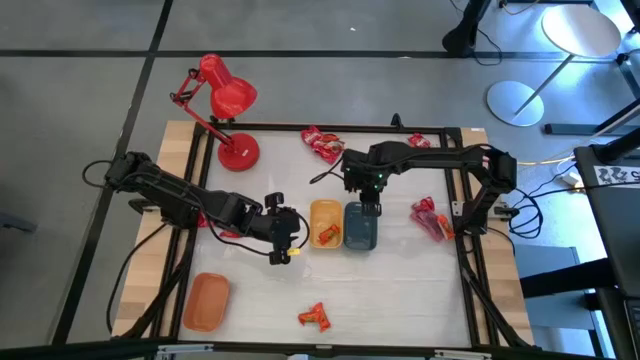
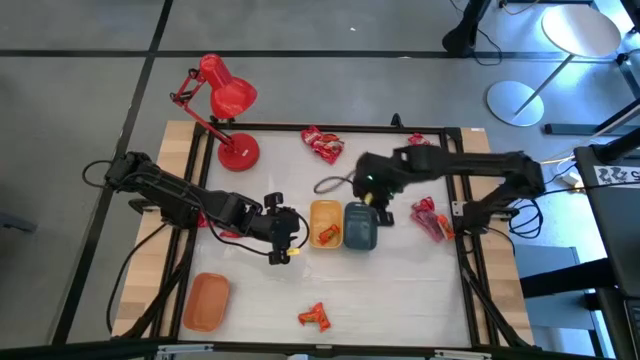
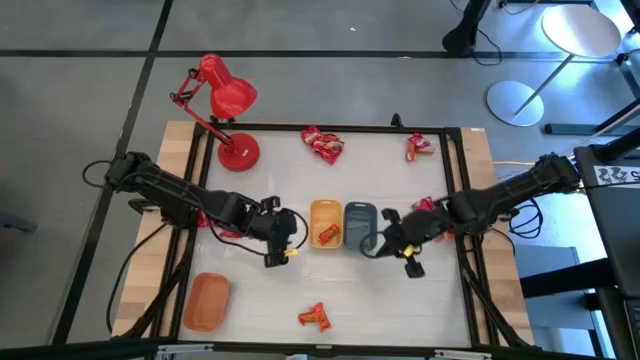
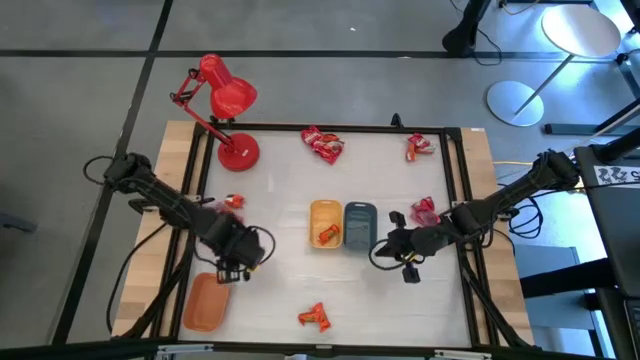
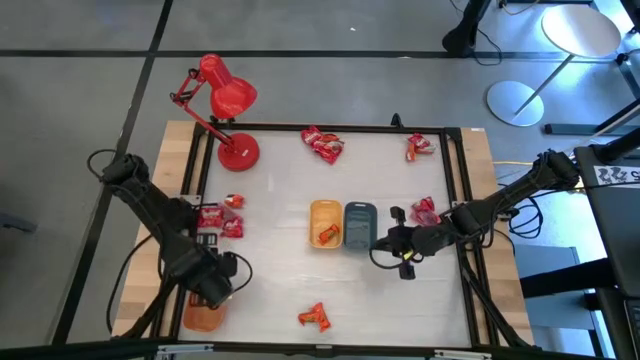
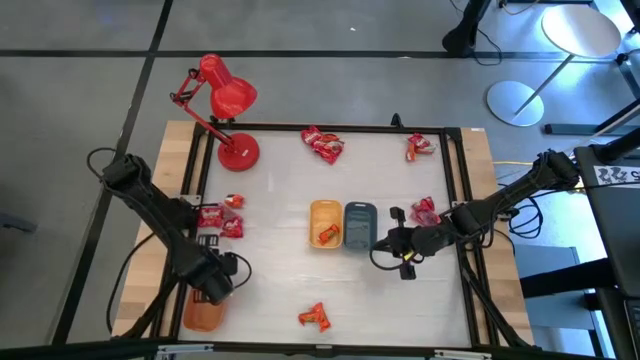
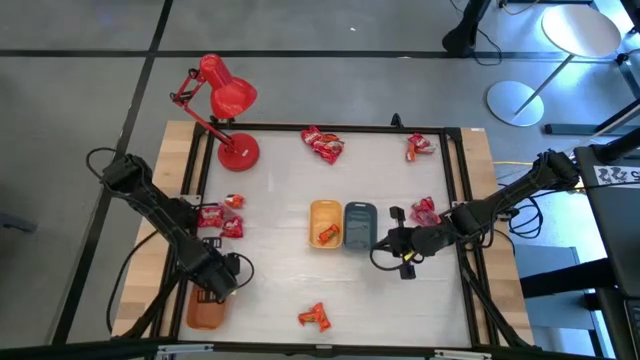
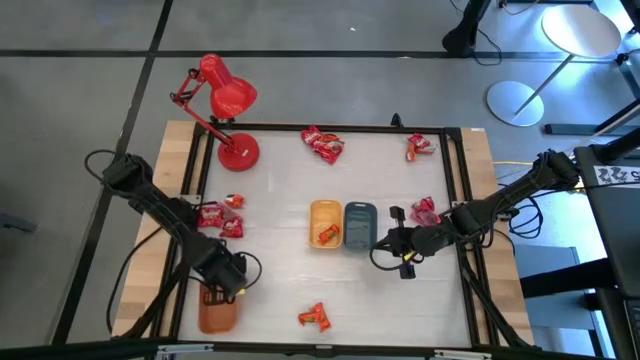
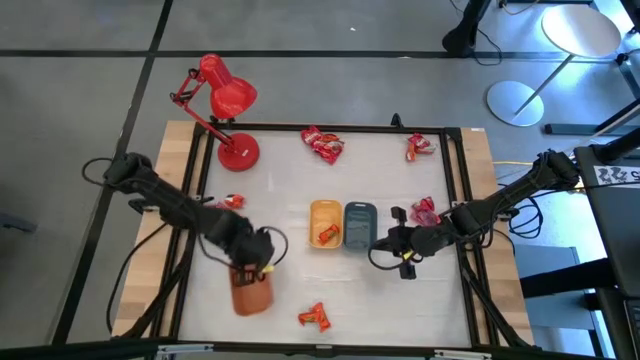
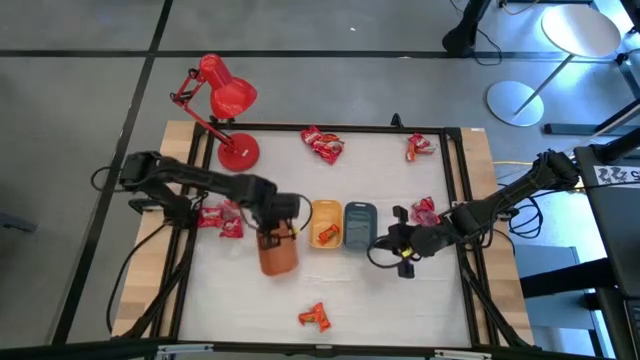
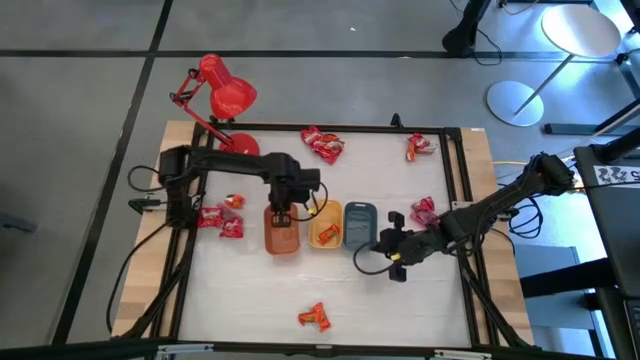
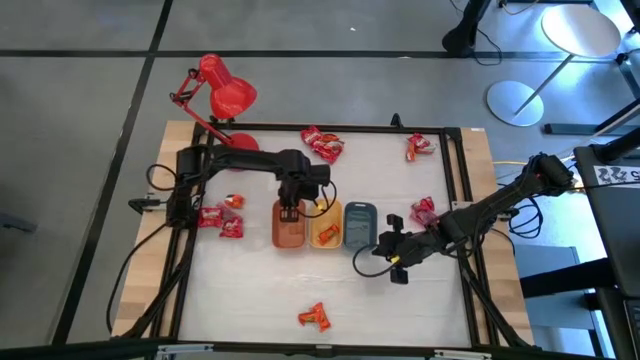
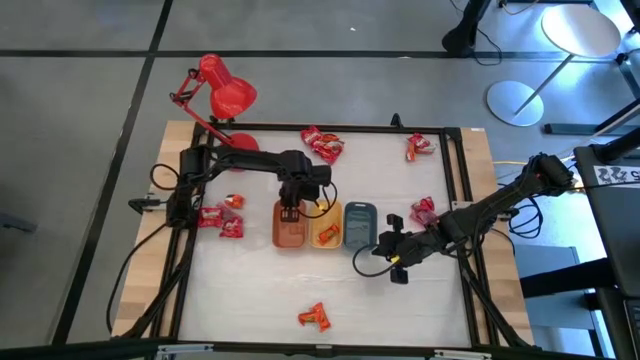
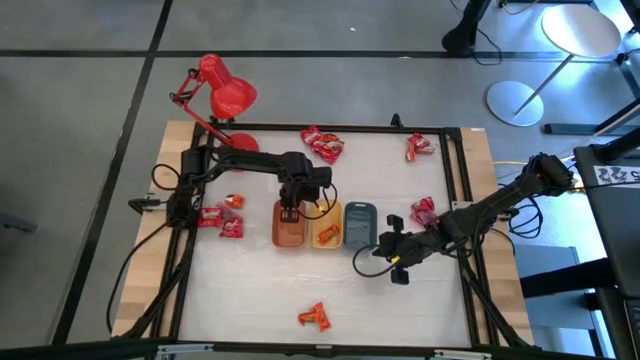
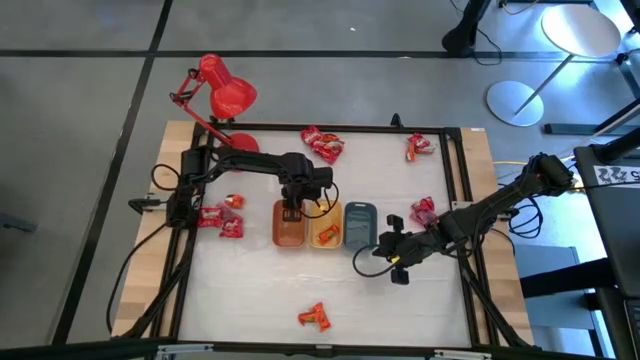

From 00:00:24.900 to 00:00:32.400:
Task: Sort candy
Move the orange bin to the center of the table

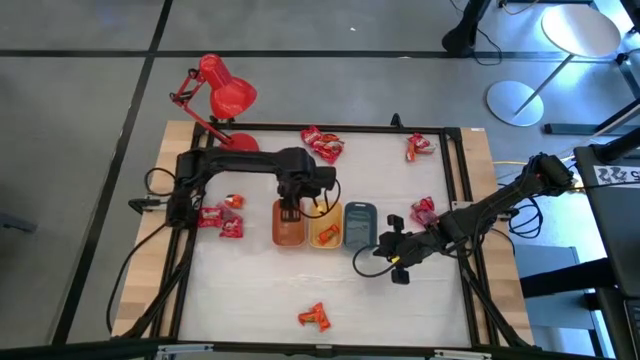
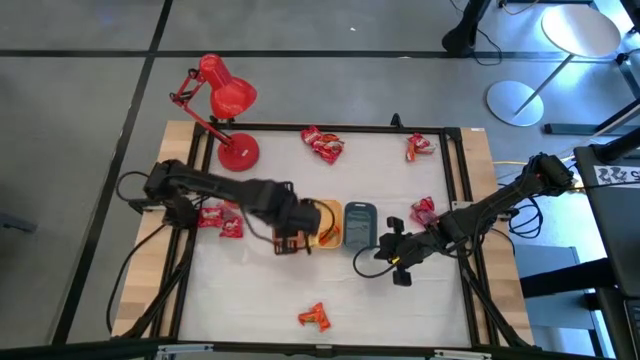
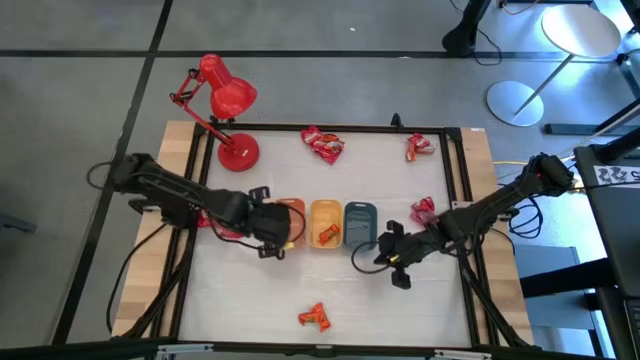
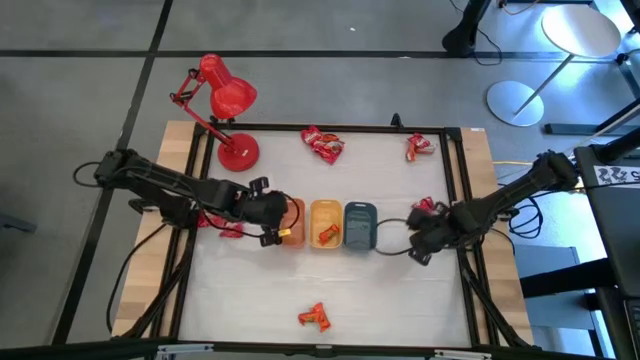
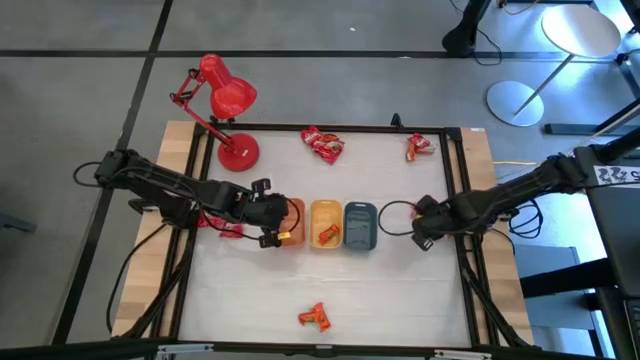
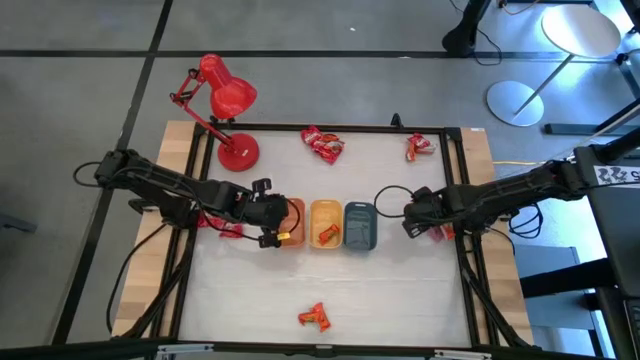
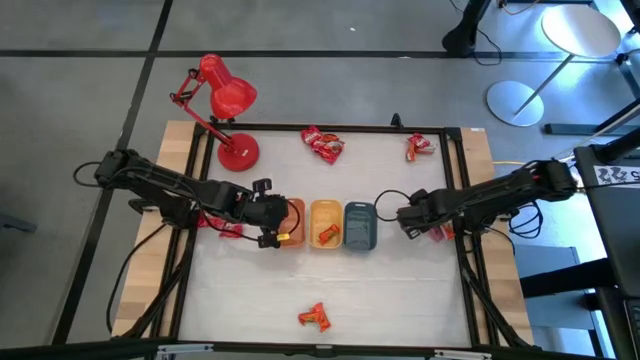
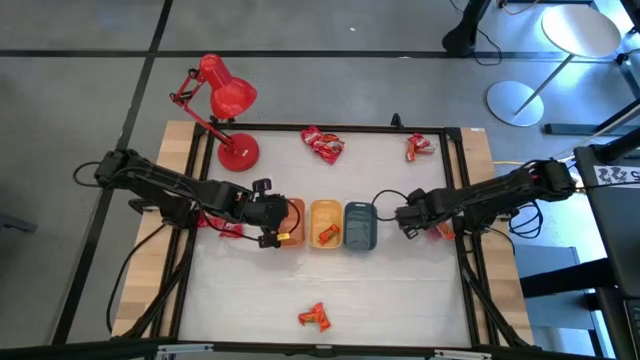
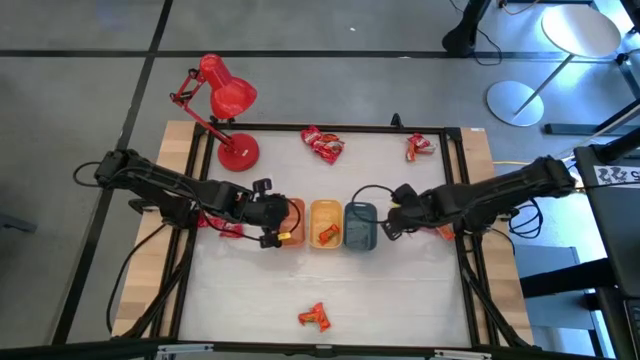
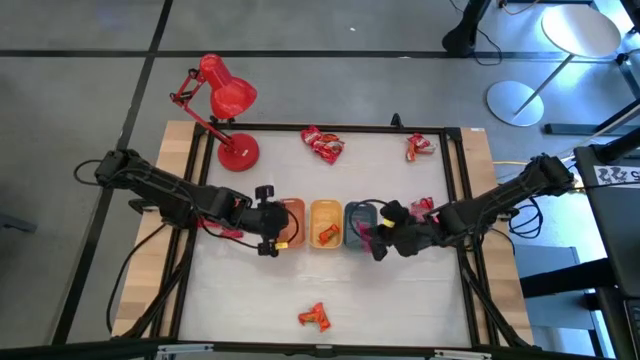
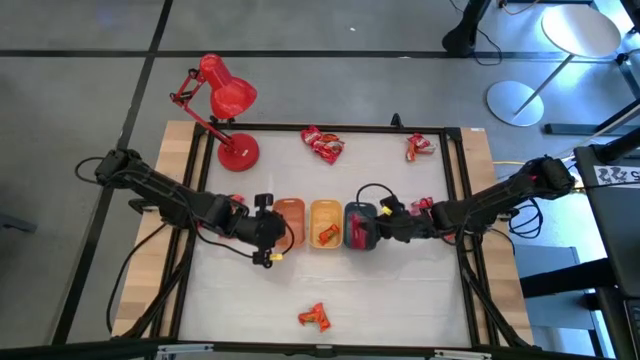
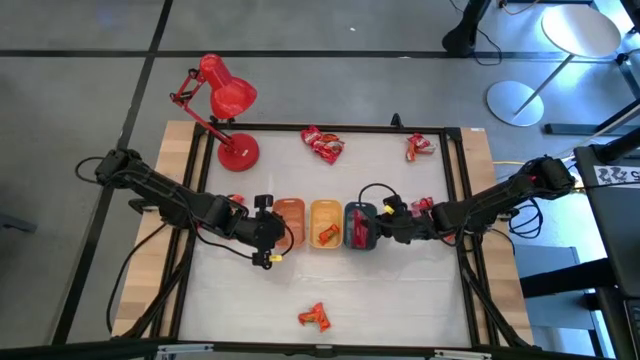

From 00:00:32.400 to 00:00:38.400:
Put the pink candy into the blue bin

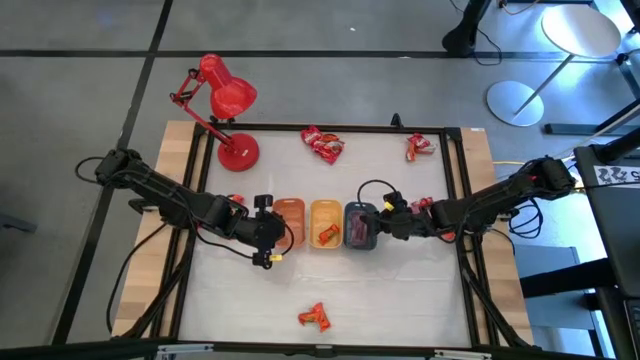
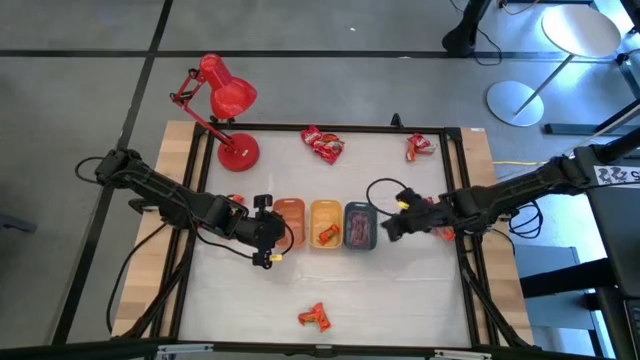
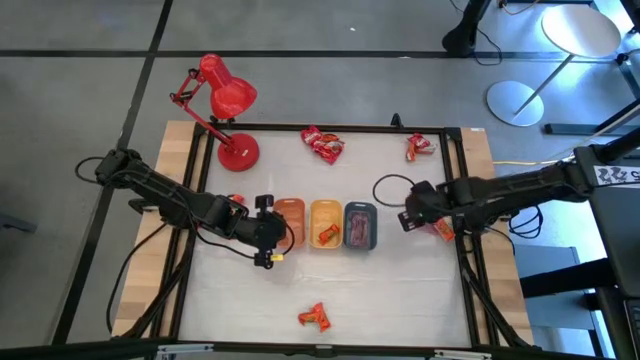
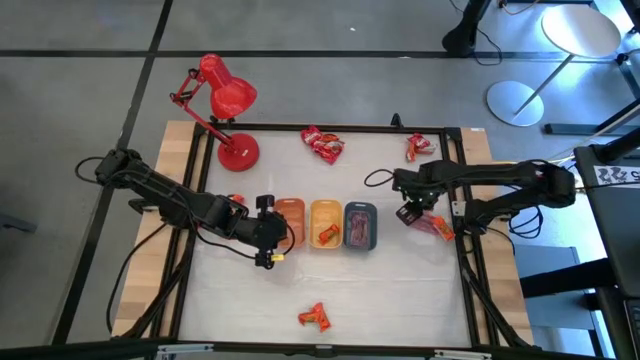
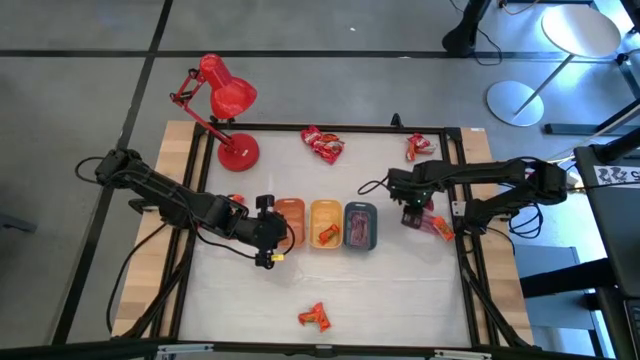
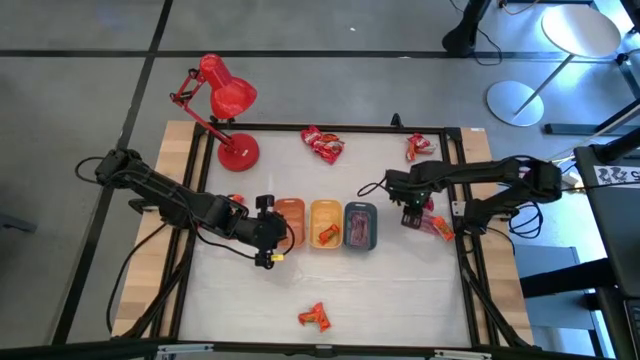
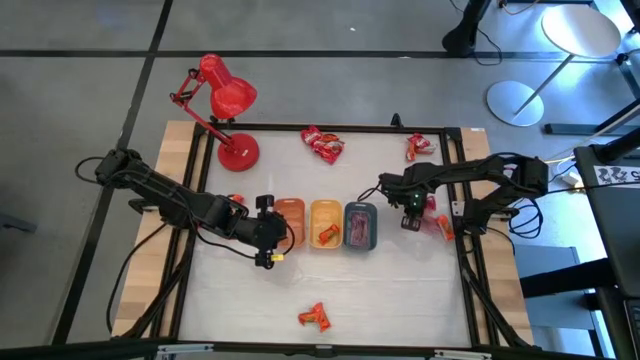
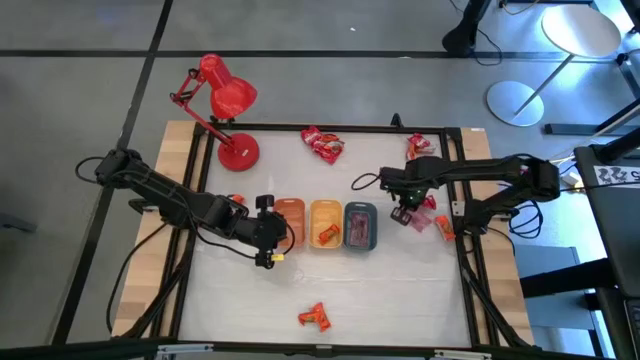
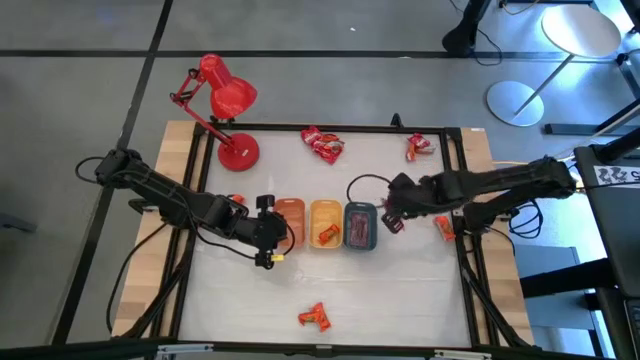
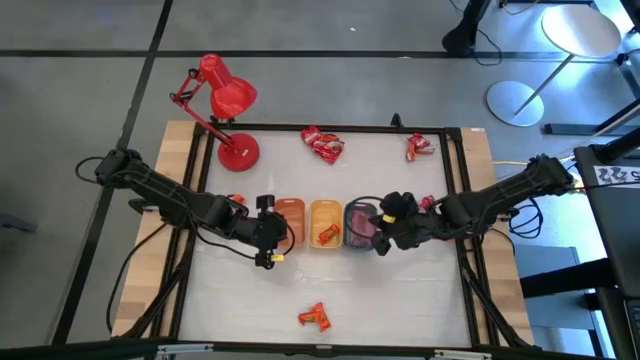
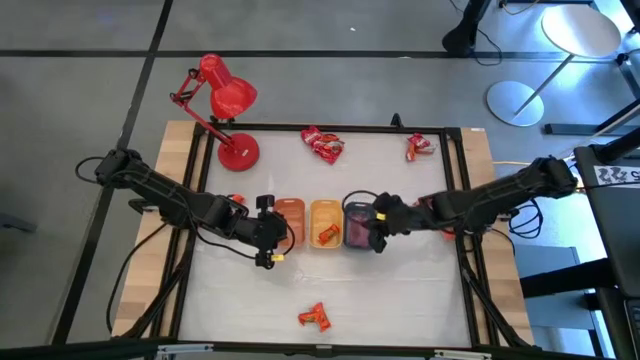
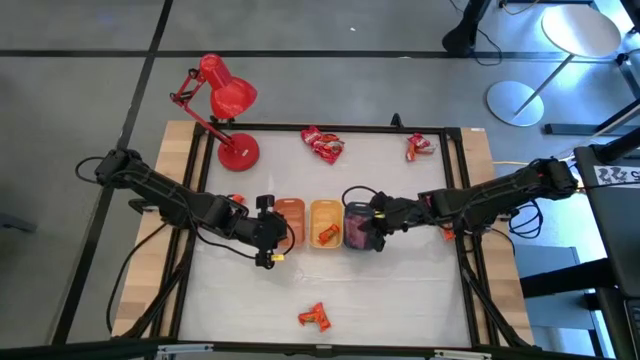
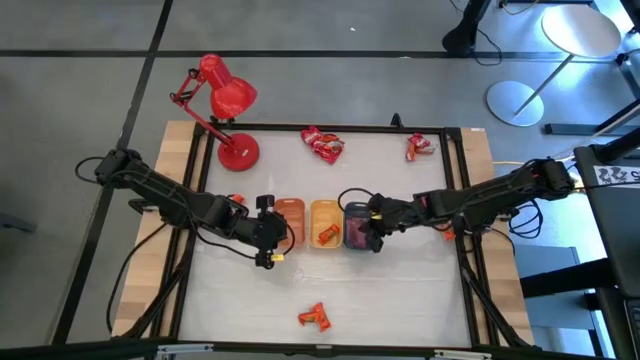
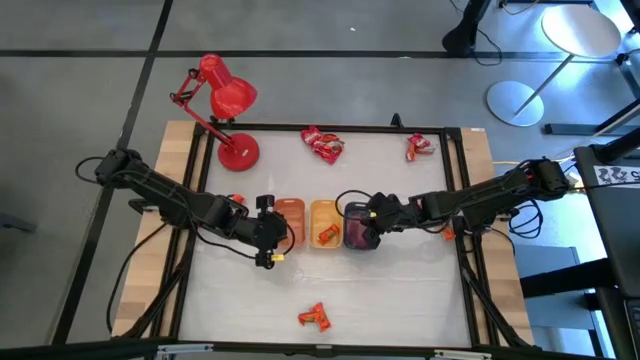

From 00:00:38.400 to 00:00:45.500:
Put the pink candy into the blue bin

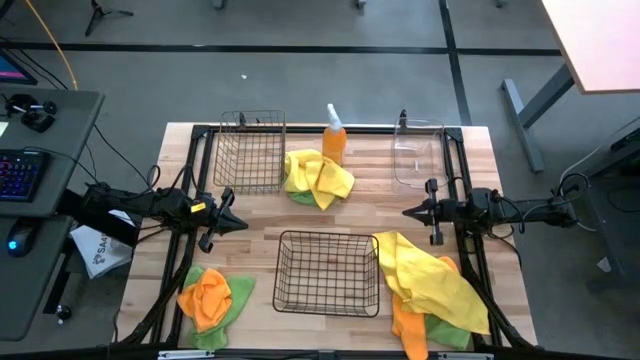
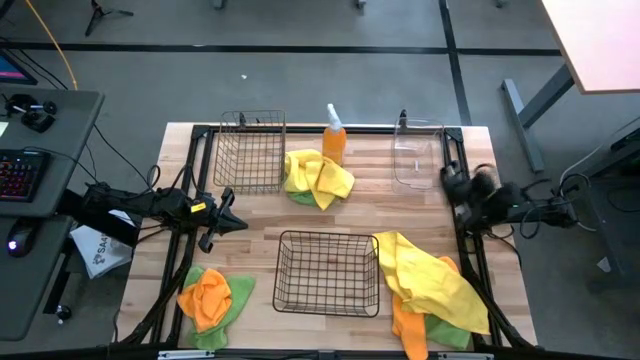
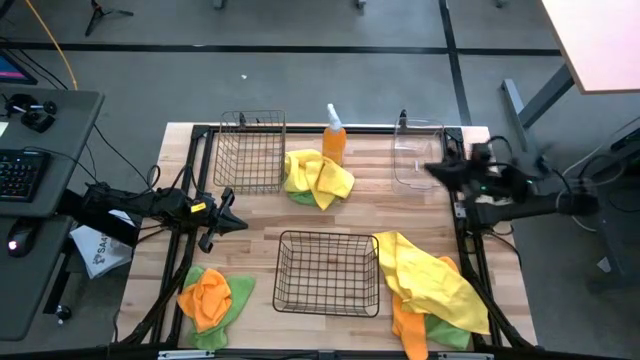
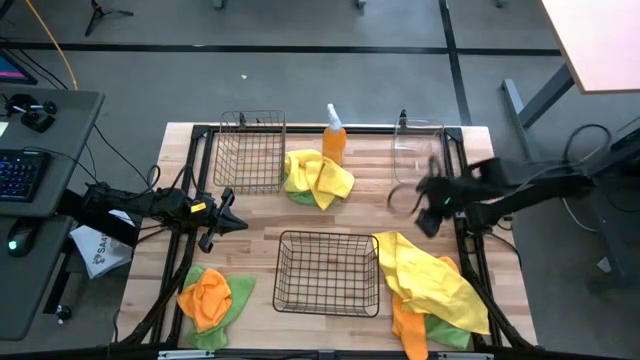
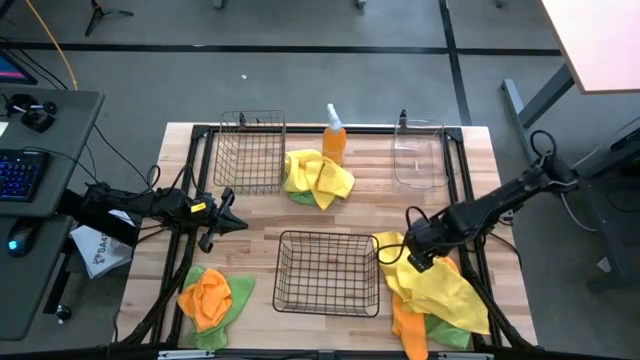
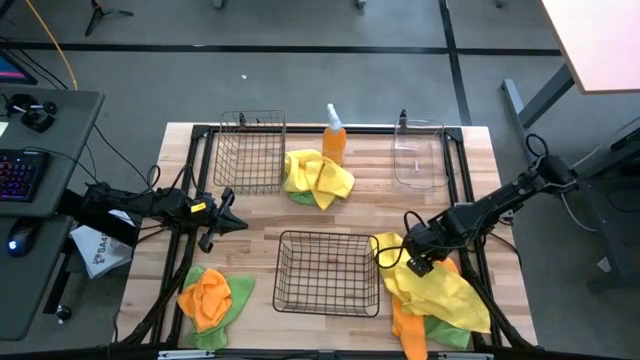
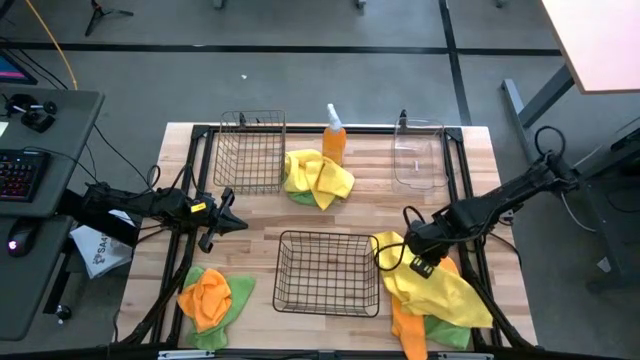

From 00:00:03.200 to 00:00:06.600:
Task: Sort microfiber towel by color & place in baskets
Put the bottom yellow microfiber towel into the transparent bin
